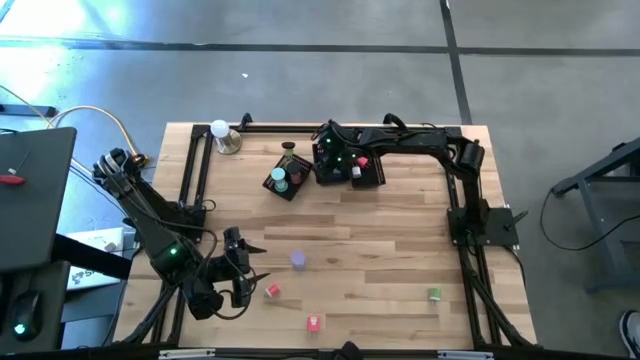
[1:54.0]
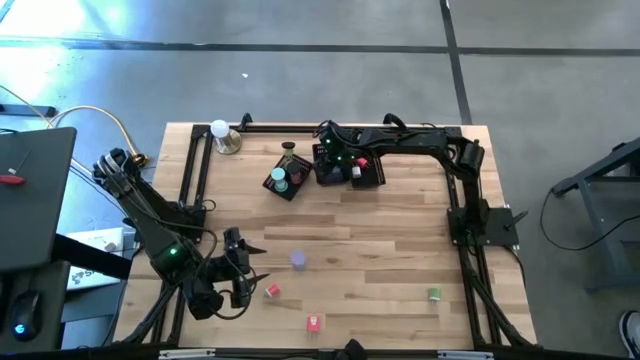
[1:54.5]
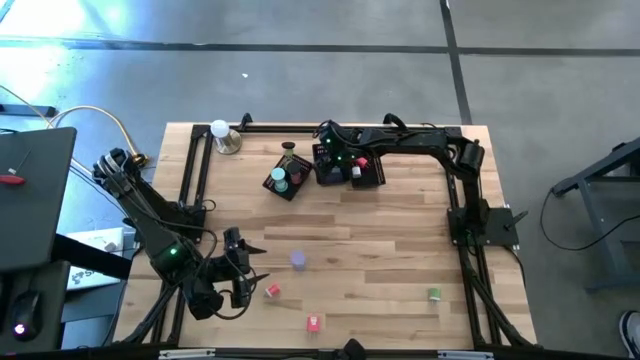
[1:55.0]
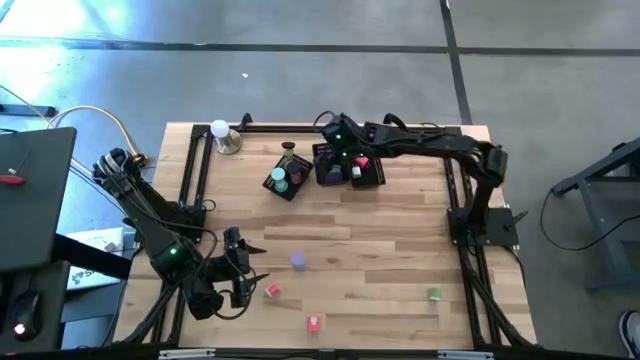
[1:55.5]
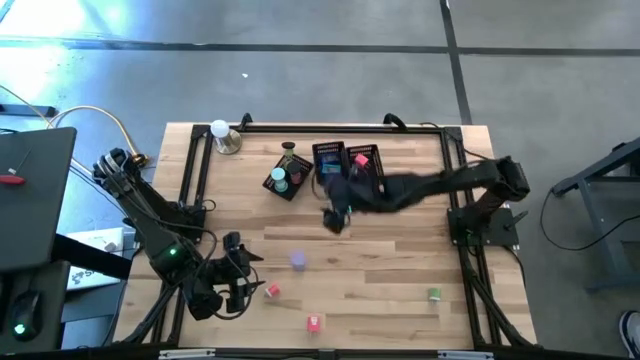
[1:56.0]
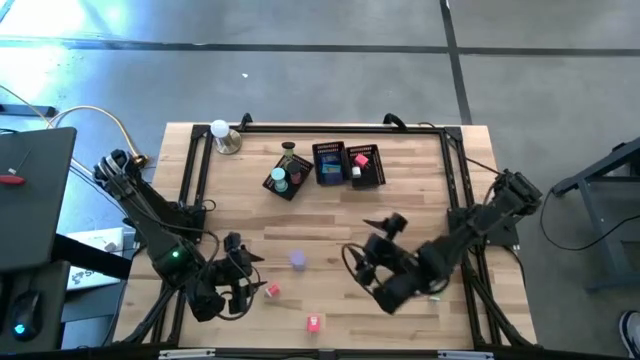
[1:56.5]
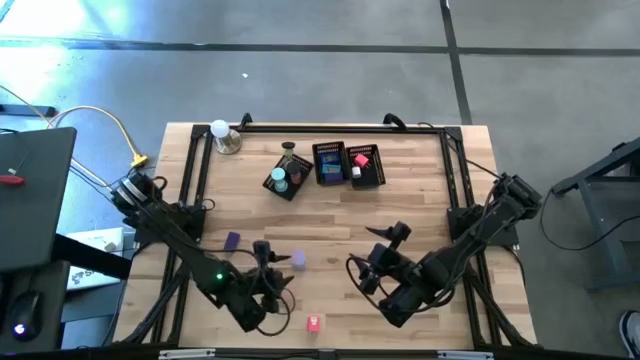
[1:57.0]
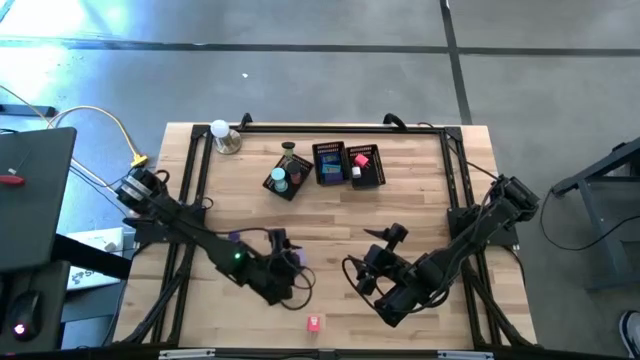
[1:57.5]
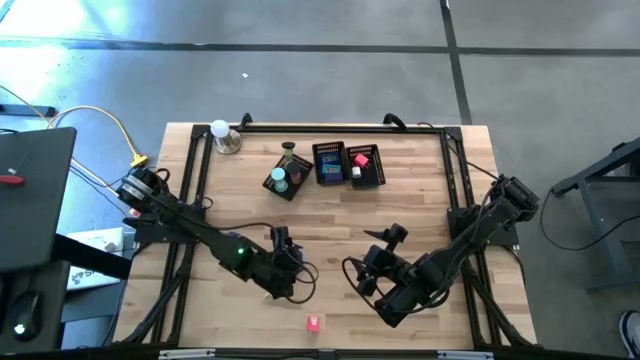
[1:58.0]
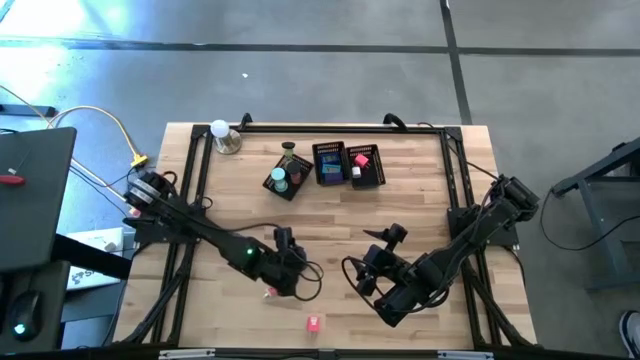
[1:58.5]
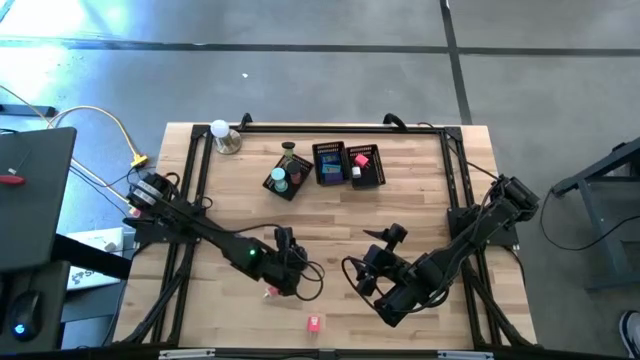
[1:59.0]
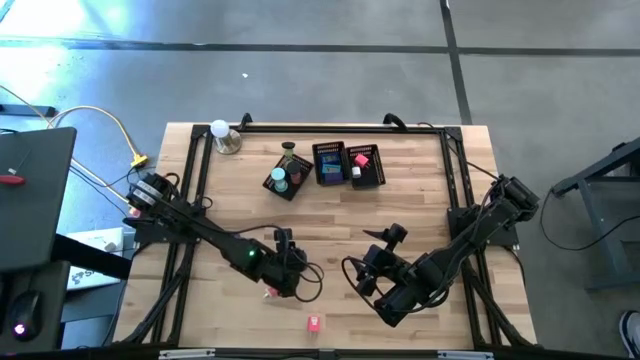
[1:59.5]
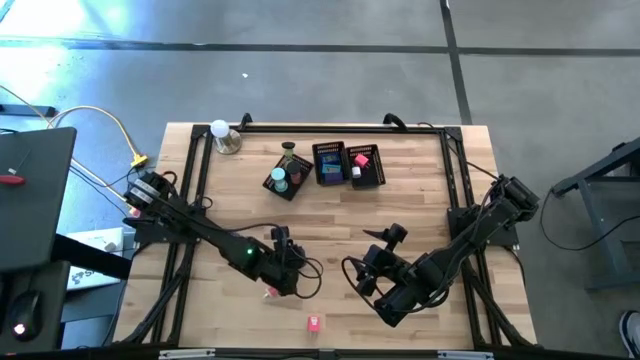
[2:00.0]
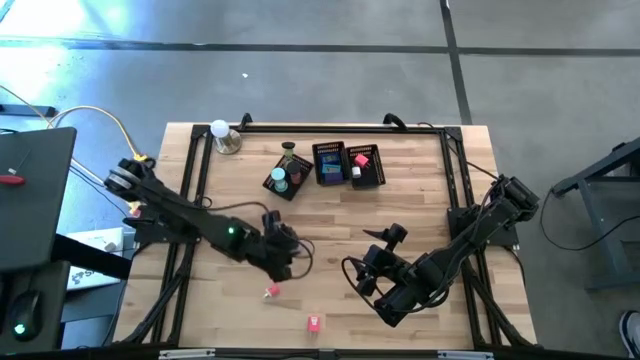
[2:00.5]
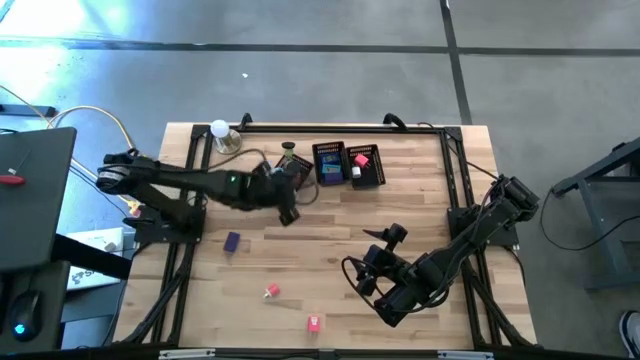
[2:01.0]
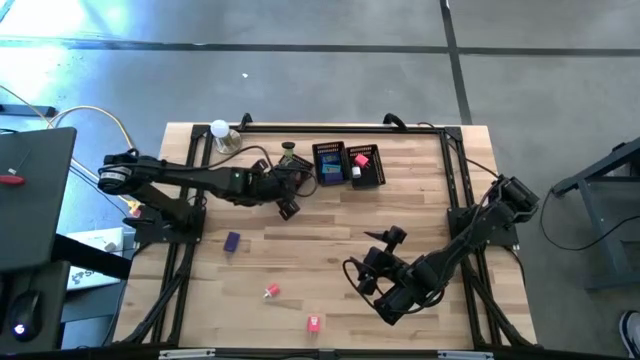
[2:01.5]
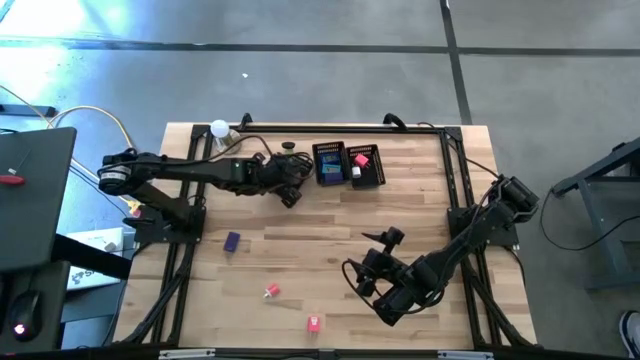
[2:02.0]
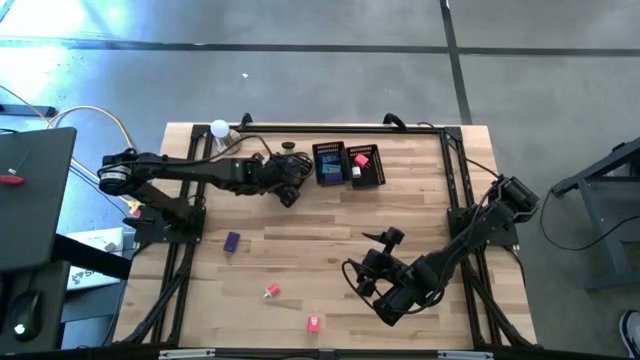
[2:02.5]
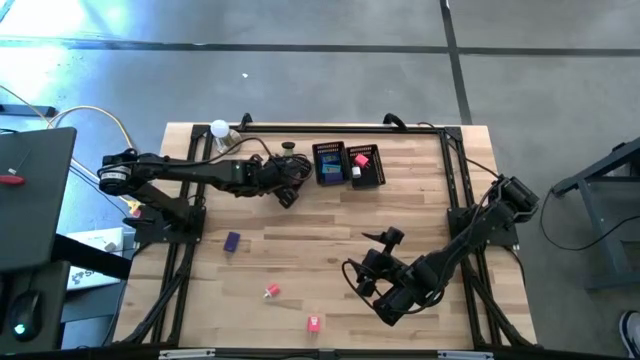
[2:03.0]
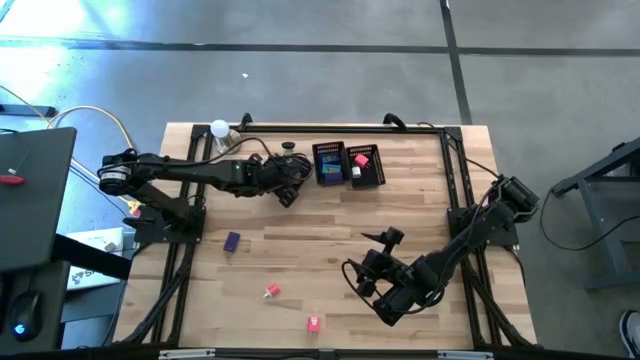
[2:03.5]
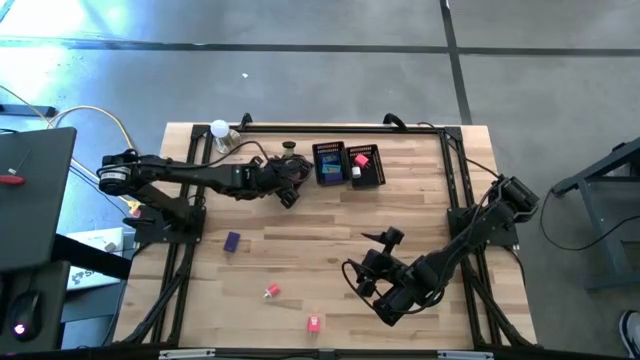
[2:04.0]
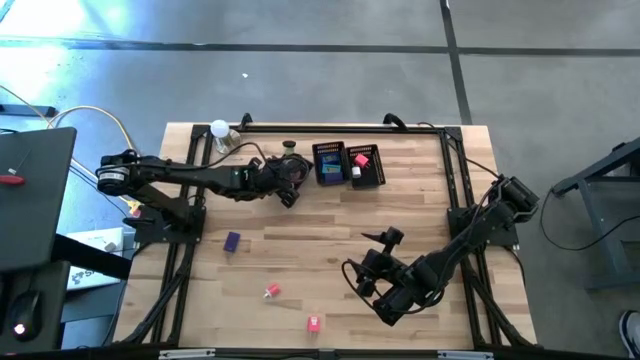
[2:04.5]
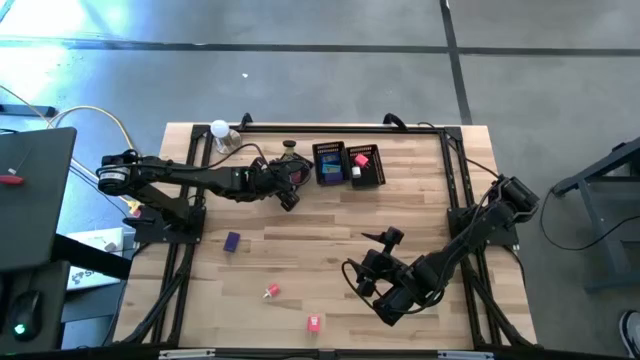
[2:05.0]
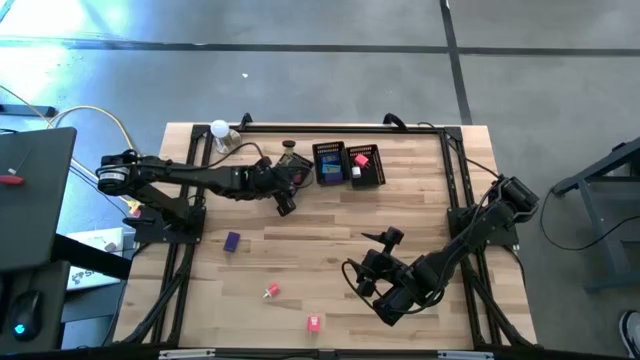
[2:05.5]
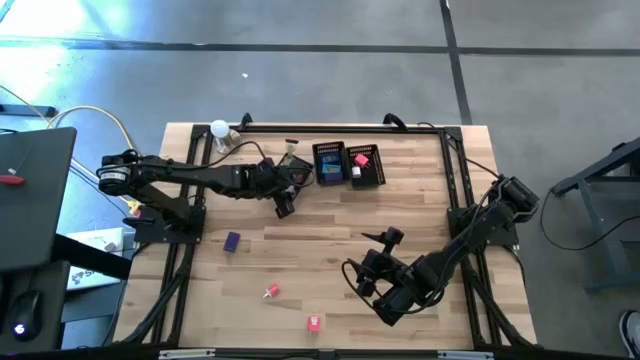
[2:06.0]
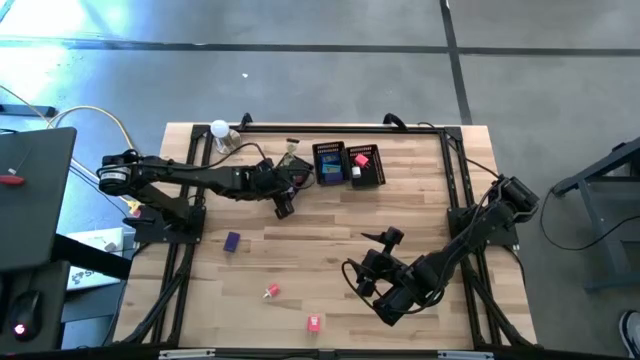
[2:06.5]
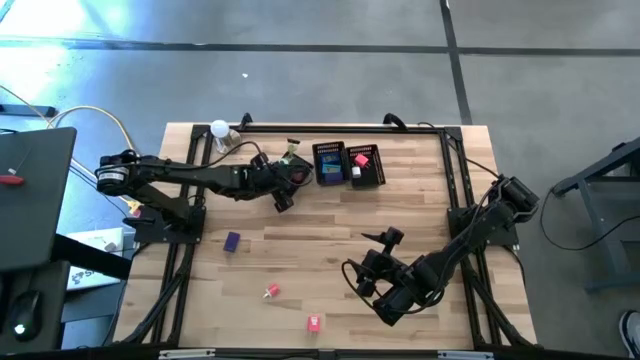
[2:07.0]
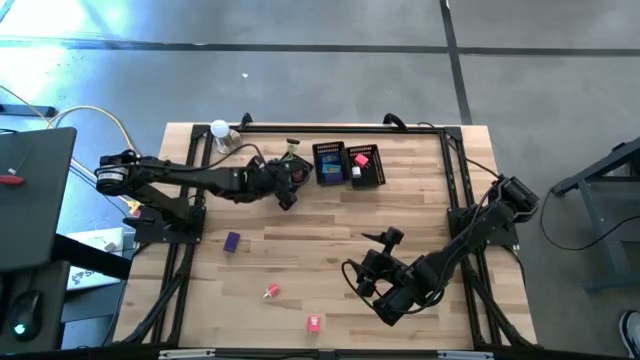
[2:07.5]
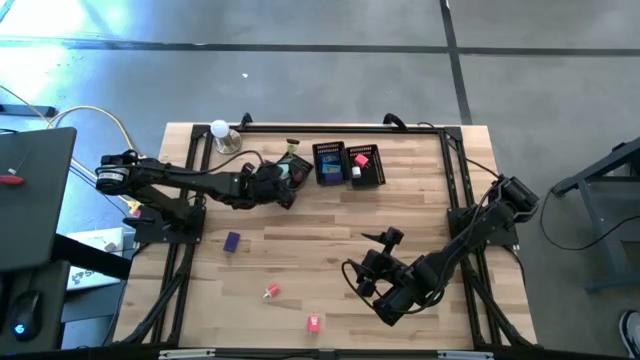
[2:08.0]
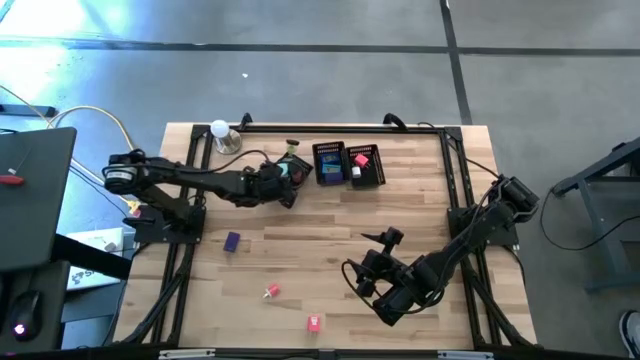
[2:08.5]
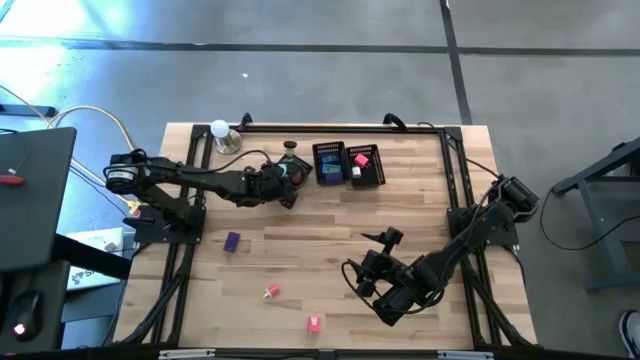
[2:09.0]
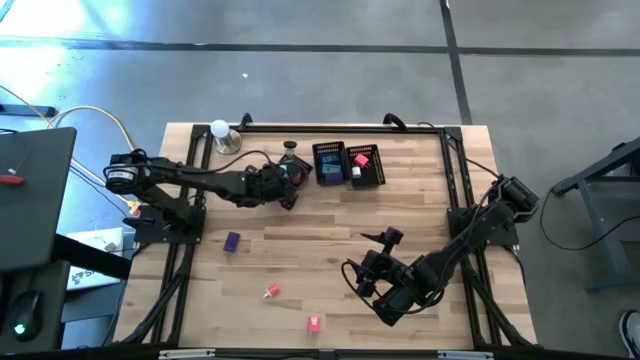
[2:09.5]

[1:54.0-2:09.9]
Task: Pick & Place Office items
Put the purple hourglass into the left black bin

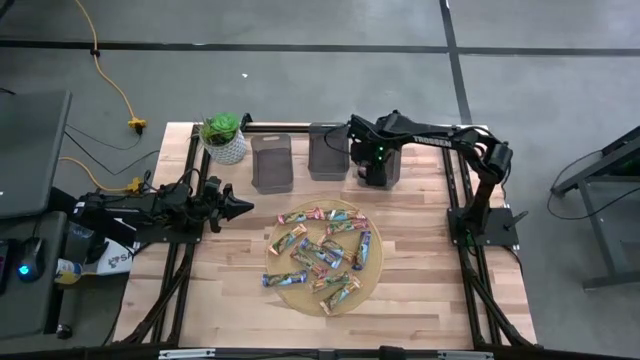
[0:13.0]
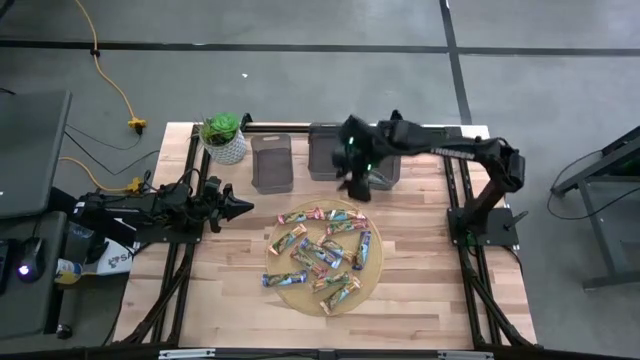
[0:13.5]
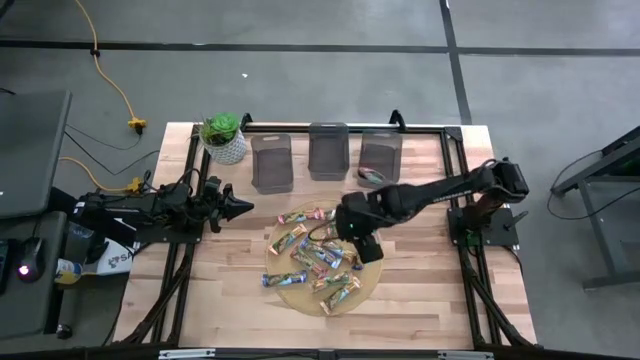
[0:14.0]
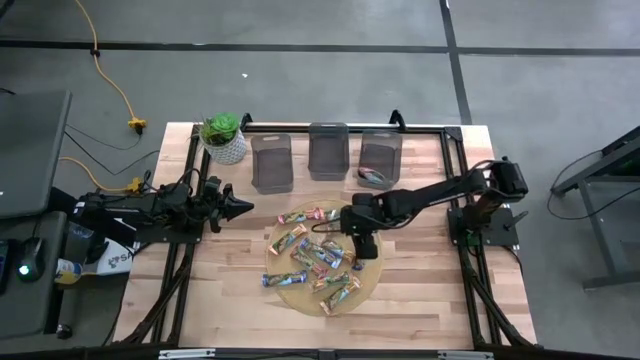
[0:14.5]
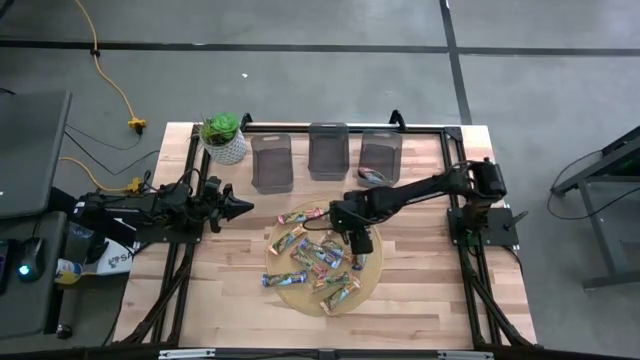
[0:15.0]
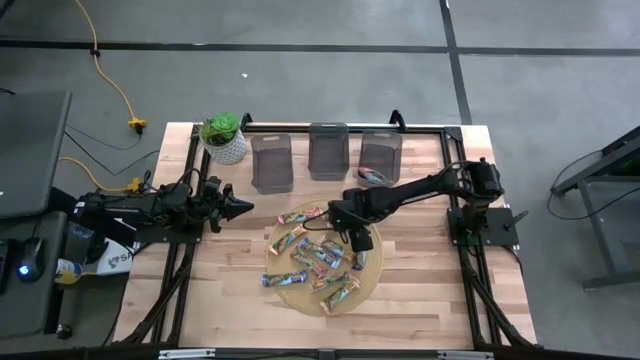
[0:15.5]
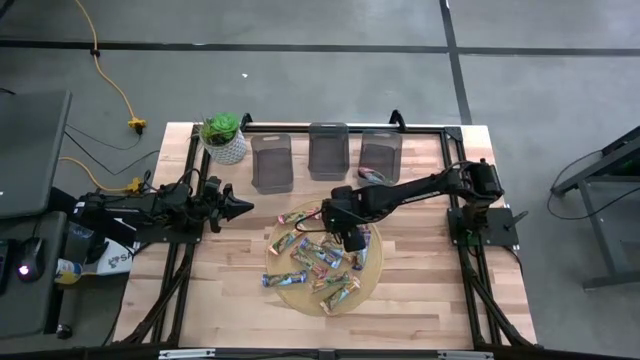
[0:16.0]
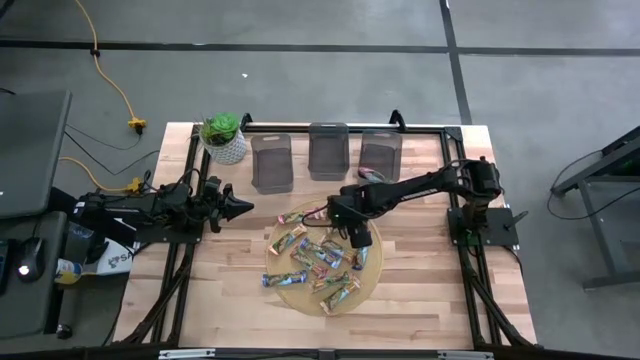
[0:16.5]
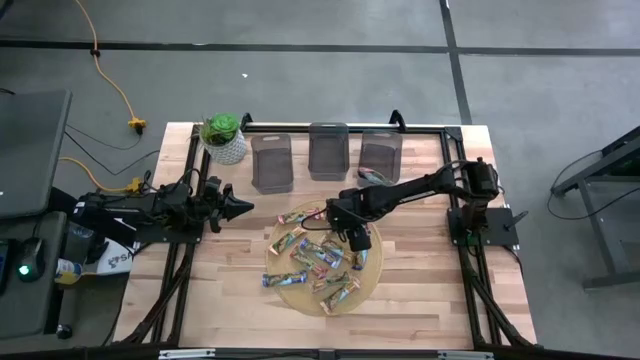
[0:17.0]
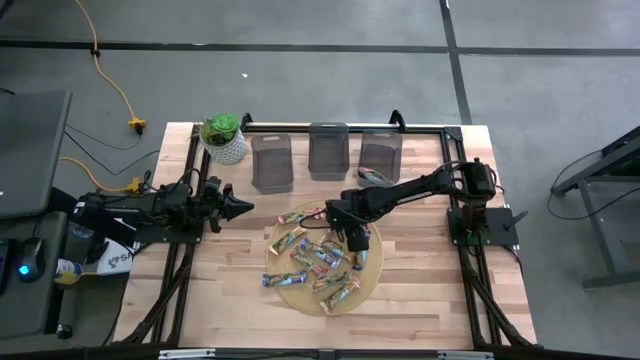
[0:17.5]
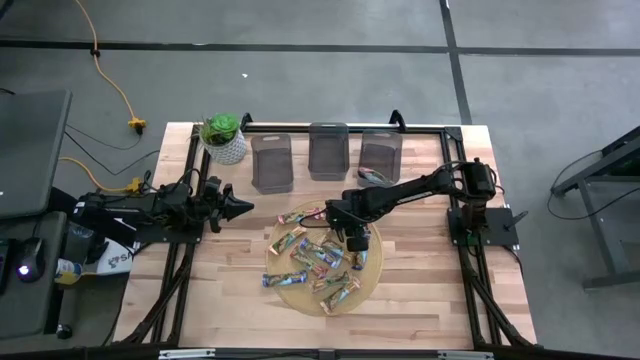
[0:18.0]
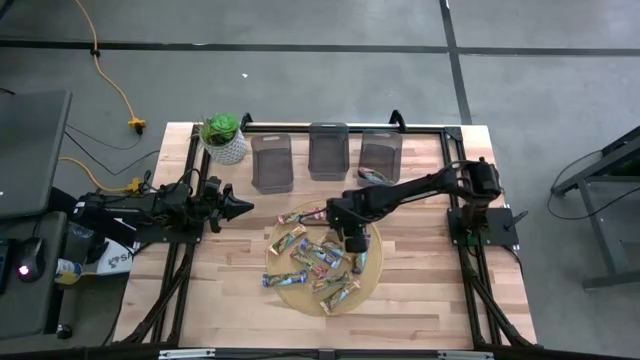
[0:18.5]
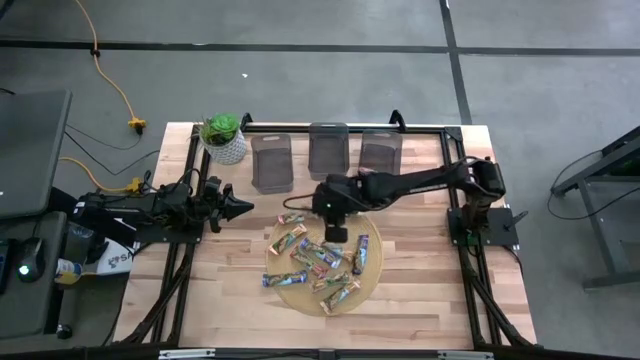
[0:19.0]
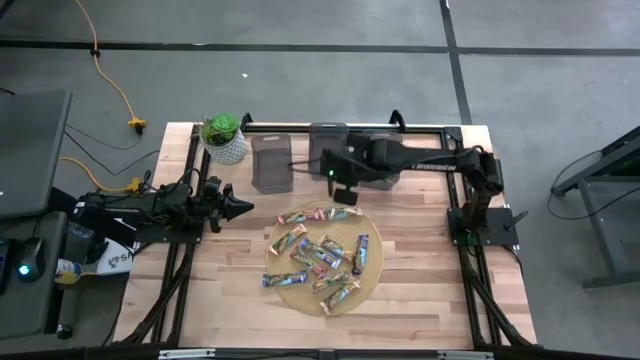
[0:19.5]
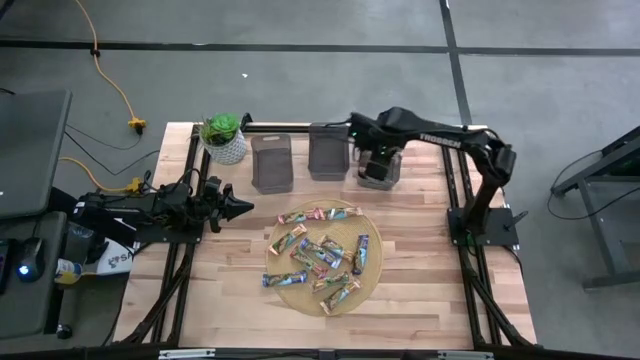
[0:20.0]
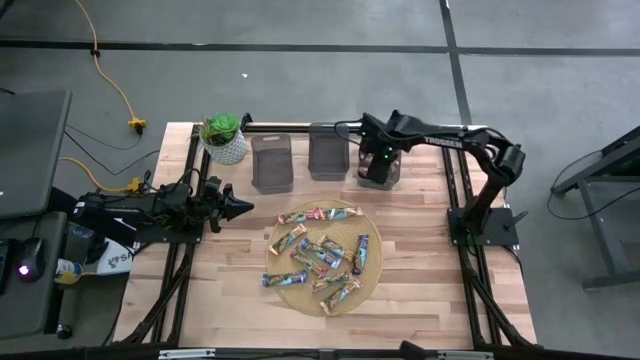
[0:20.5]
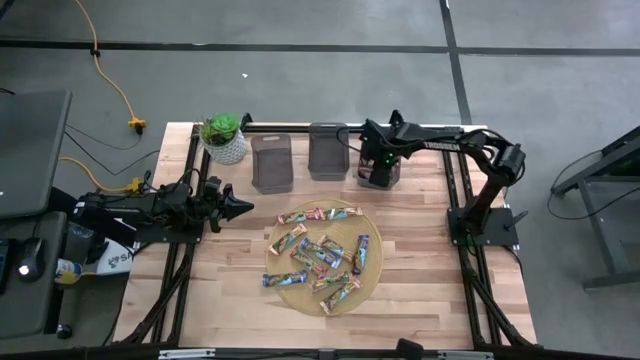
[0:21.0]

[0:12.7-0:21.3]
Task: Pick and place Granola Bars by type
Put the orange granola bar into the right black bin
